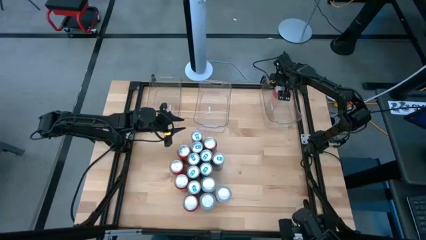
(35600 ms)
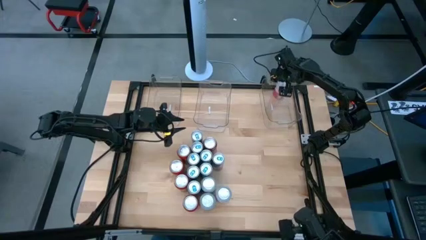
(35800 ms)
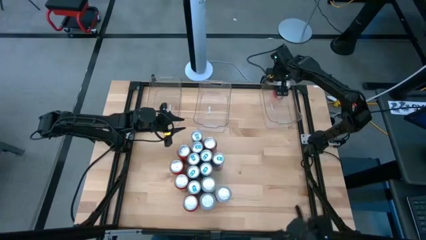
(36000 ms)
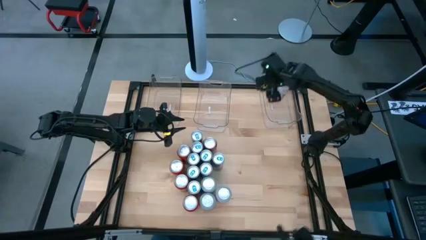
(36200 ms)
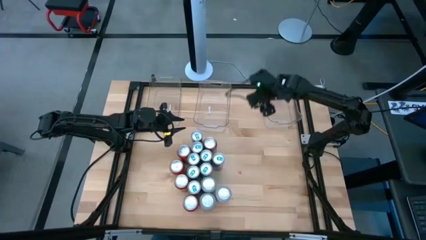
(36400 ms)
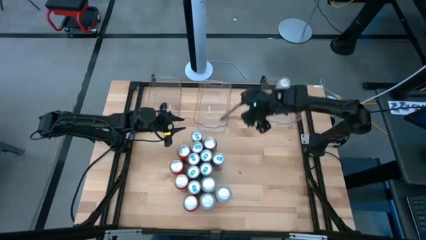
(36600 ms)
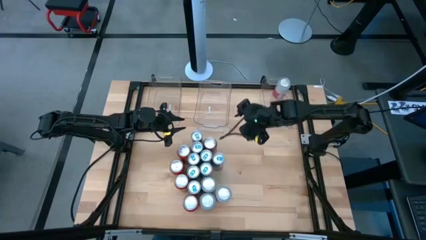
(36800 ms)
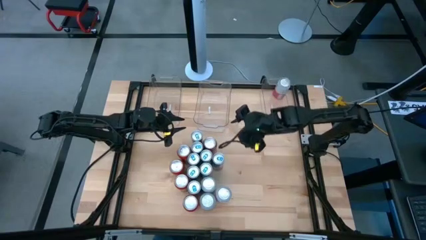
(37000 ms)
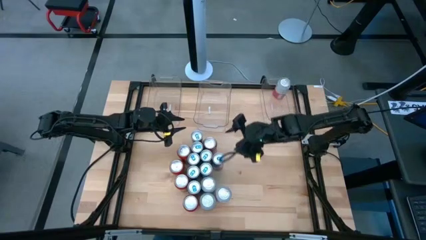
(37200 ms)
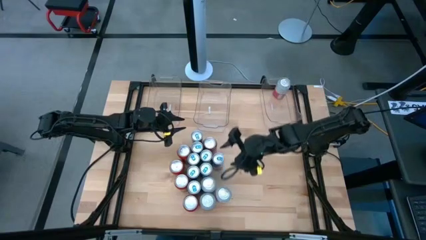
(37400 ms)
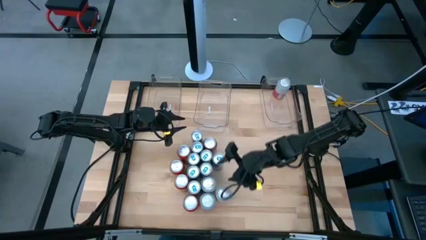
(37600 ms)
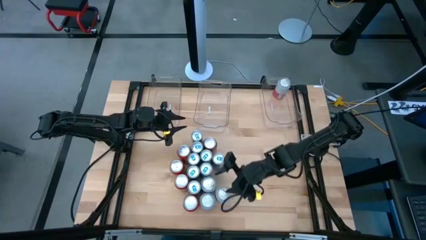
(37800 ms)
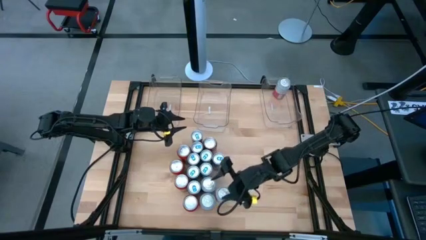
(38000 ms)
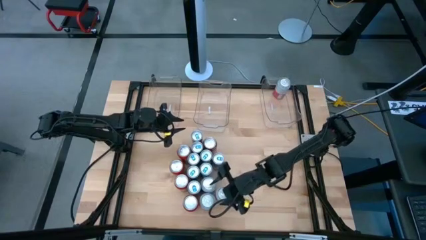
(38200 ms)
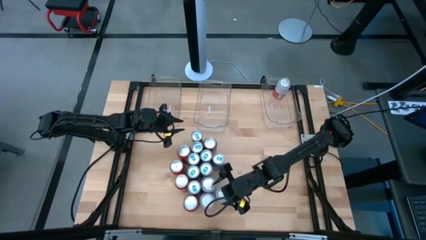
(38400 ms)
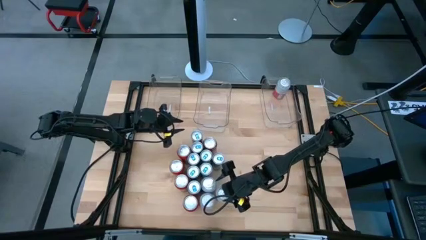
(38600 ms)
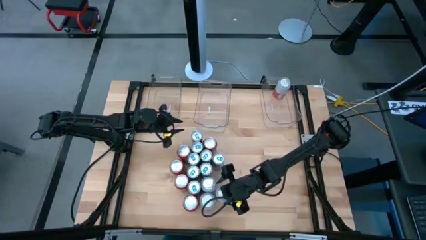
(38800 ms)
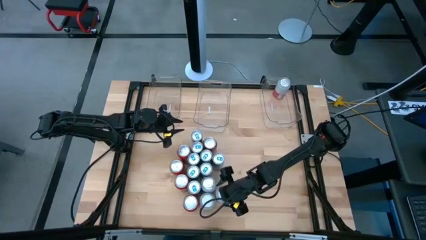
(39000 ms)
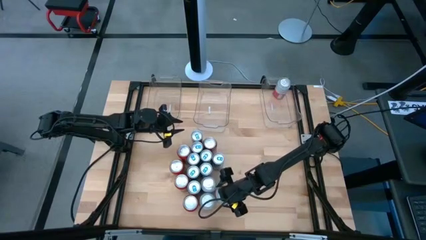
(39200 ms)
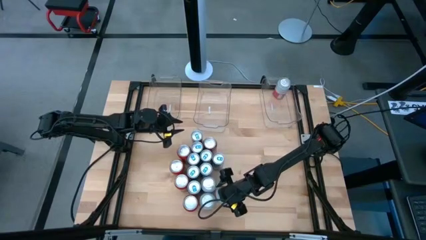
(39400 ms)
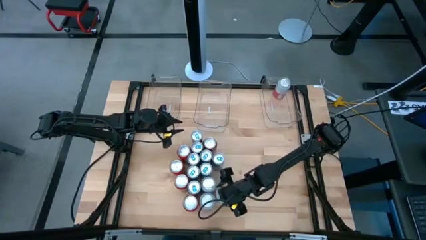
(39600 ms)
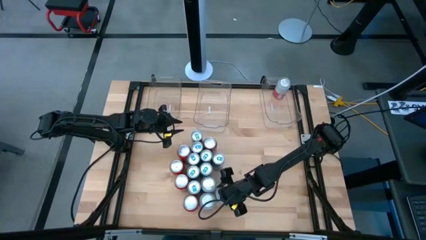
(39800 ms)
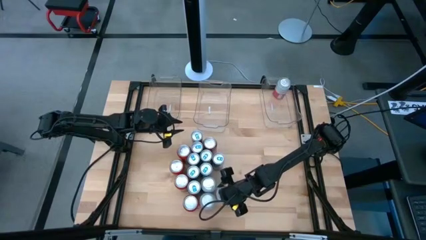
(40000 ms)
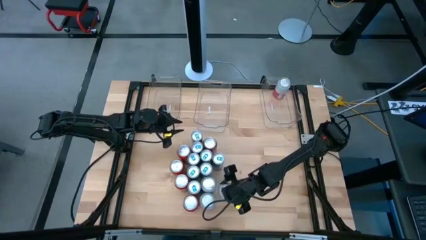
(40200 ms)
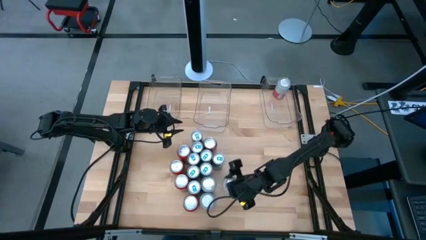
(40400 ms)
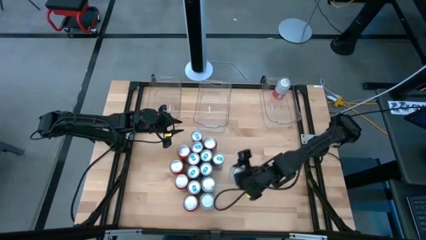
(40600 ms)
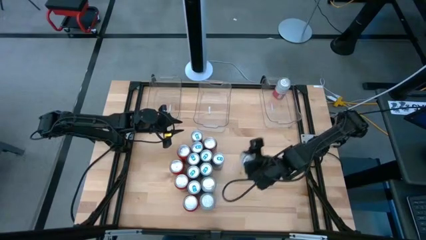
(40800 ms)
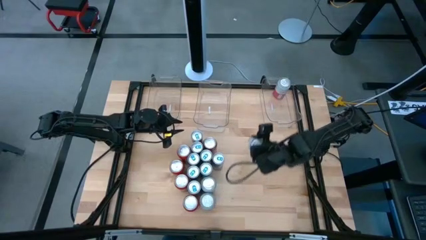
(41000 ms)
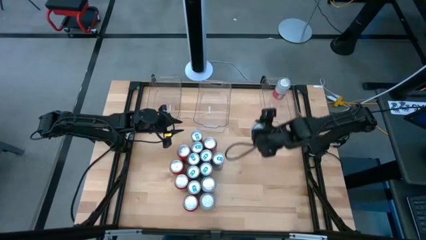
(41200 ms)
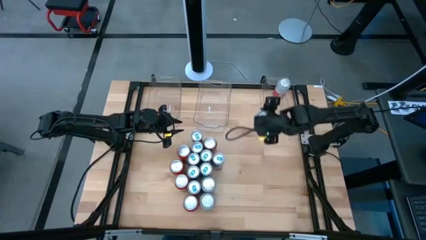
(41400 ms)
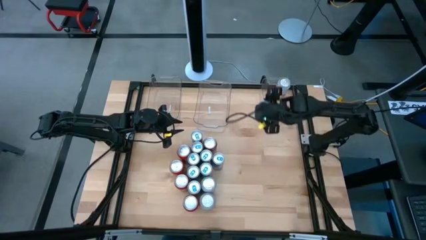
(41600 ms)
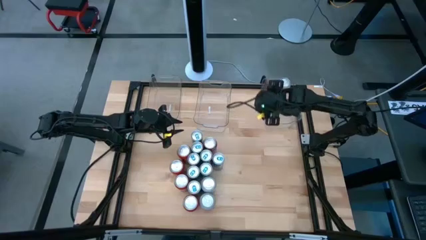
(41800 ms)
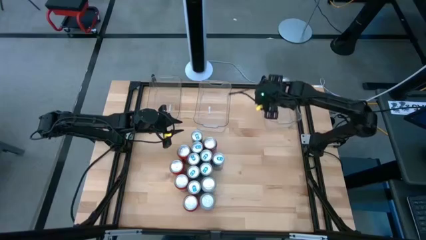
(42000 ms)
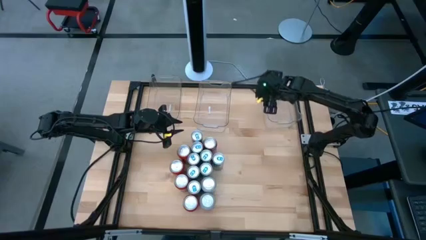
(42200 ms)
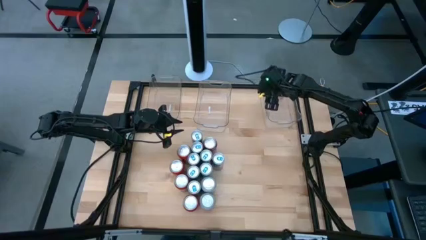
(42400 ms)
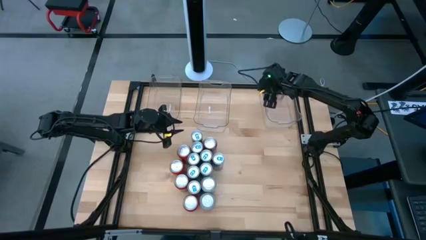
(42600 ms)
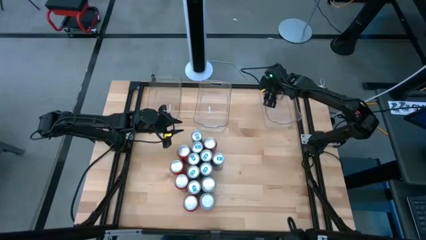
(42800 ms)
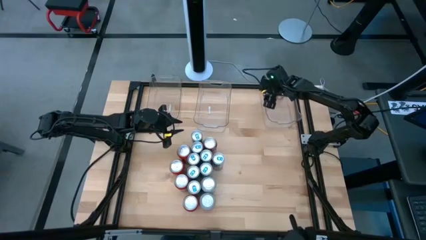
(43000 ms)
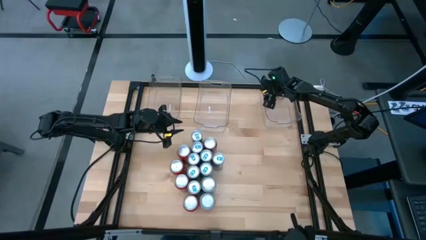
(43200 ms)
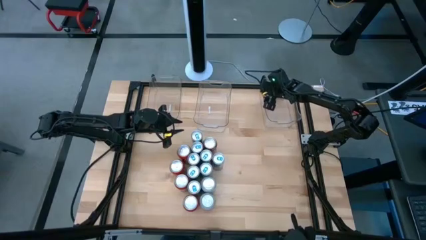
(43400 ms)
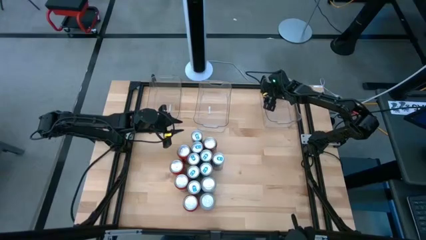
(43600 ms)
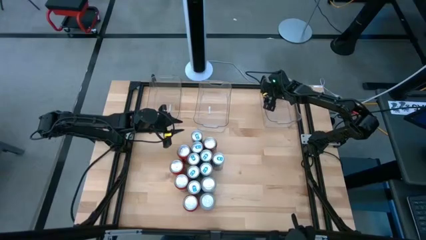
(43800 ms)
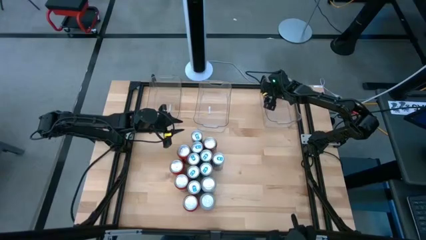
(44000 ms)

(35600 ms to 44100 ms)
Task: Sort soda cans
Put the orange-white soda can into the right transparent bin

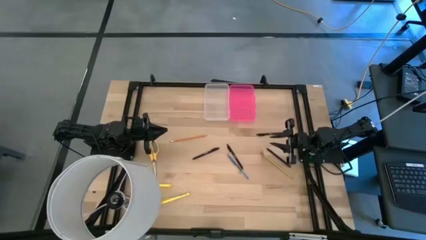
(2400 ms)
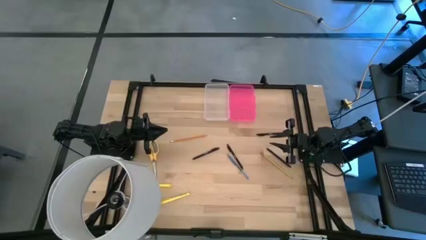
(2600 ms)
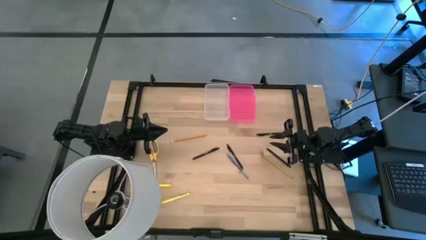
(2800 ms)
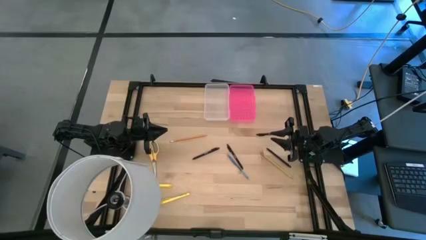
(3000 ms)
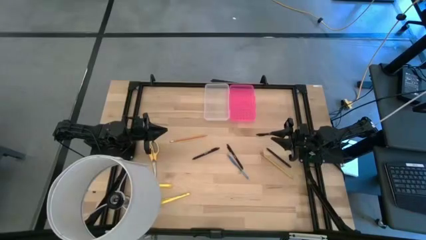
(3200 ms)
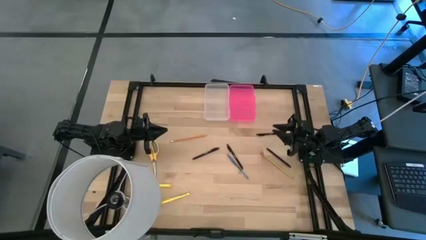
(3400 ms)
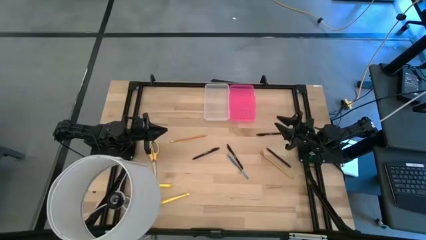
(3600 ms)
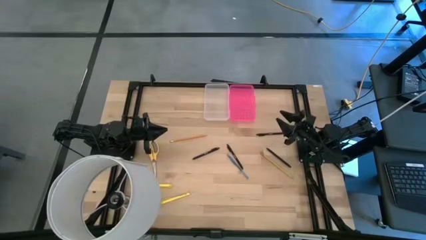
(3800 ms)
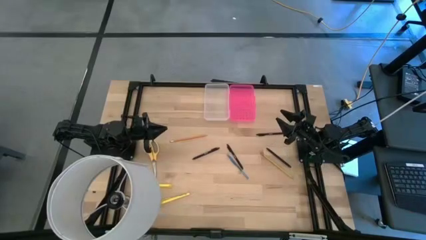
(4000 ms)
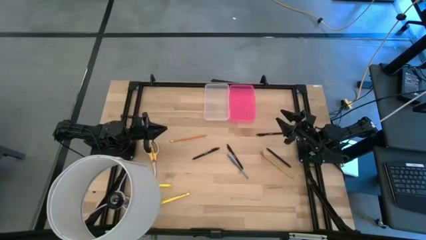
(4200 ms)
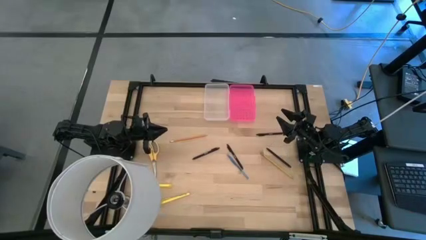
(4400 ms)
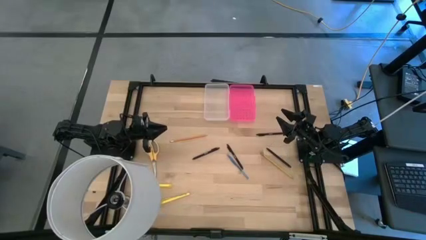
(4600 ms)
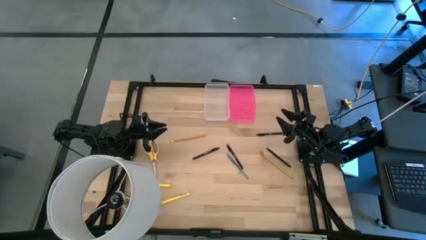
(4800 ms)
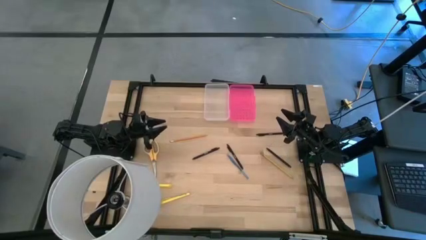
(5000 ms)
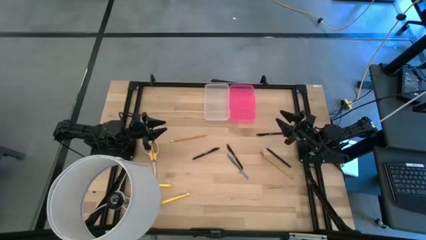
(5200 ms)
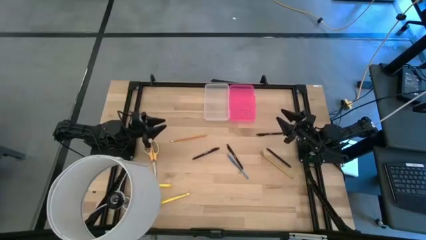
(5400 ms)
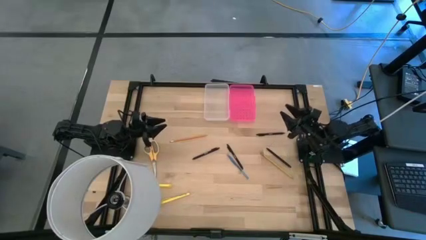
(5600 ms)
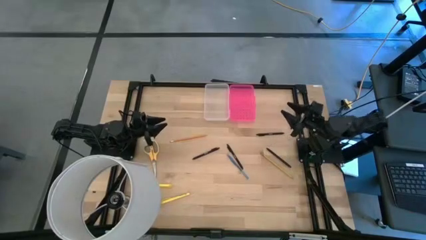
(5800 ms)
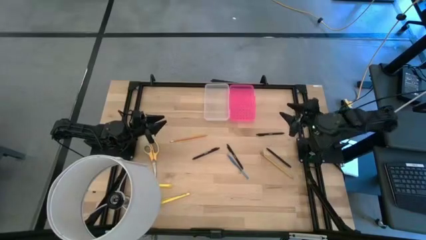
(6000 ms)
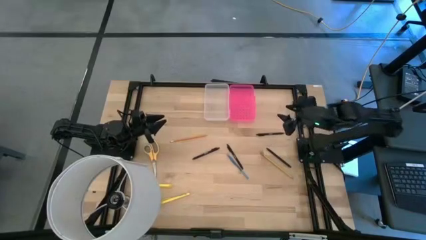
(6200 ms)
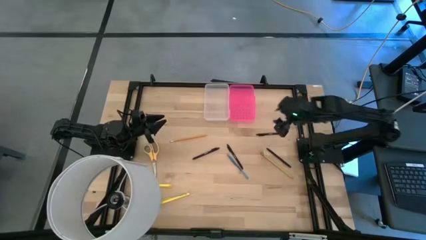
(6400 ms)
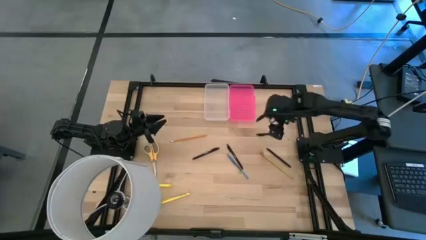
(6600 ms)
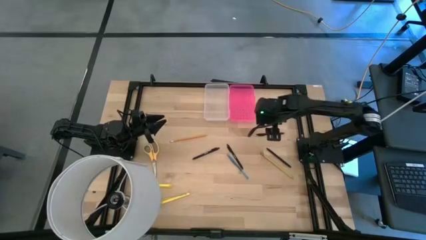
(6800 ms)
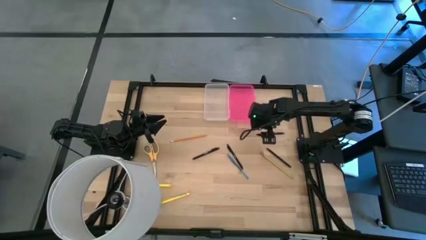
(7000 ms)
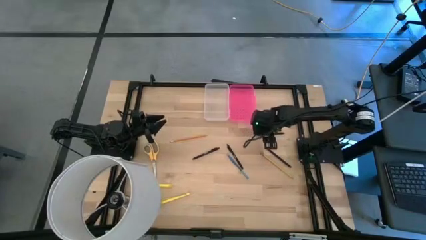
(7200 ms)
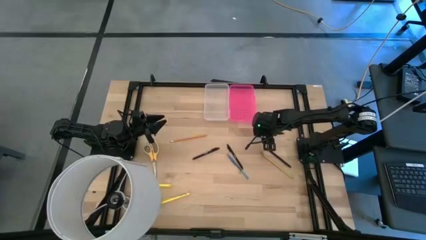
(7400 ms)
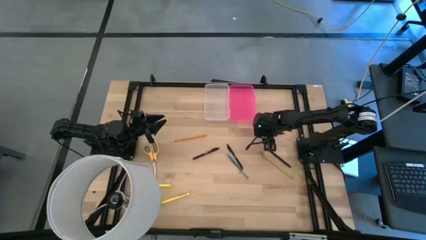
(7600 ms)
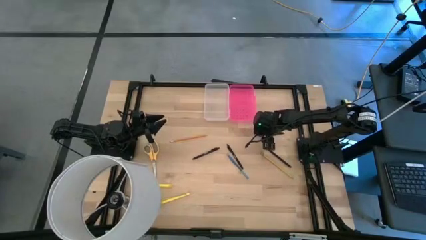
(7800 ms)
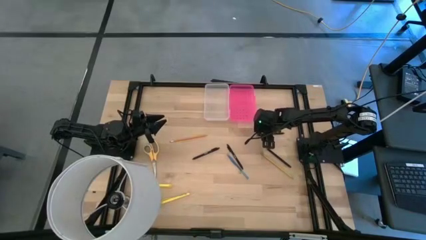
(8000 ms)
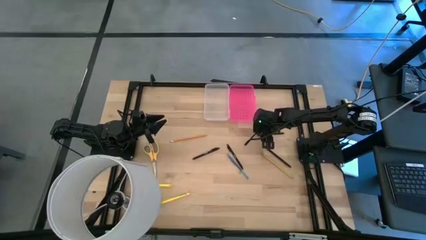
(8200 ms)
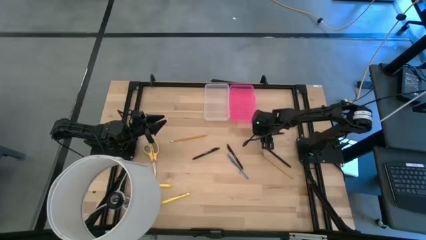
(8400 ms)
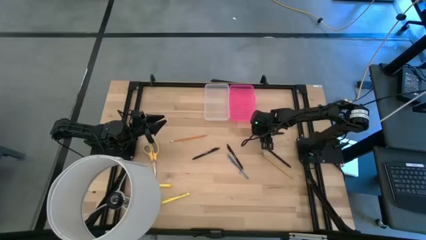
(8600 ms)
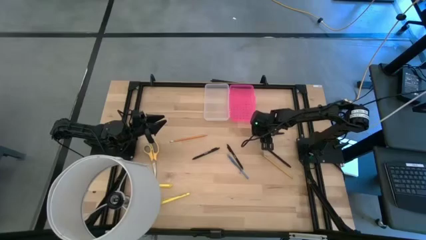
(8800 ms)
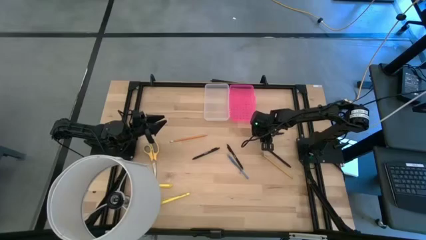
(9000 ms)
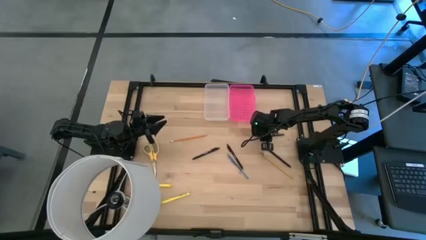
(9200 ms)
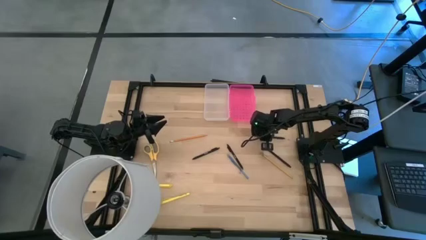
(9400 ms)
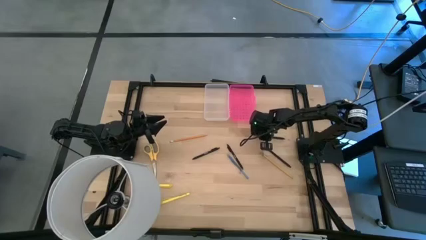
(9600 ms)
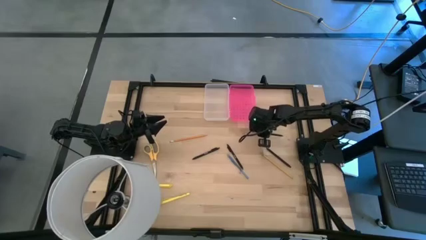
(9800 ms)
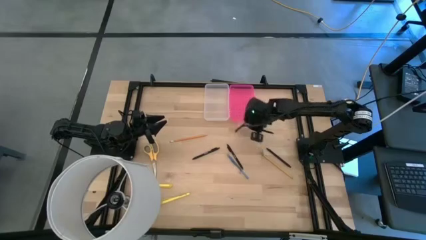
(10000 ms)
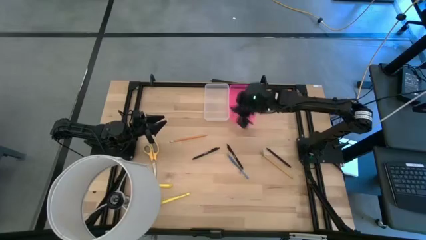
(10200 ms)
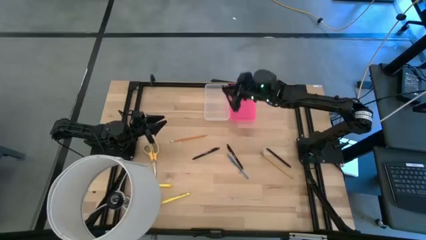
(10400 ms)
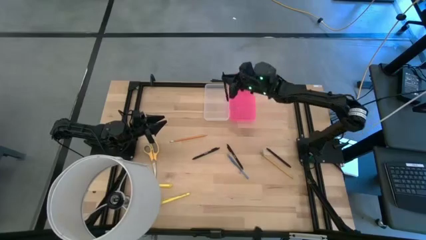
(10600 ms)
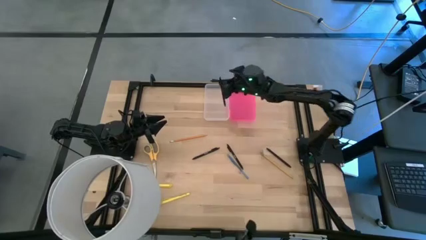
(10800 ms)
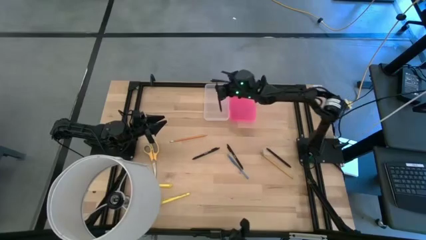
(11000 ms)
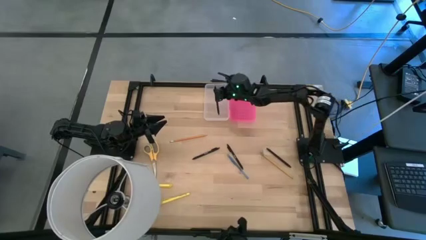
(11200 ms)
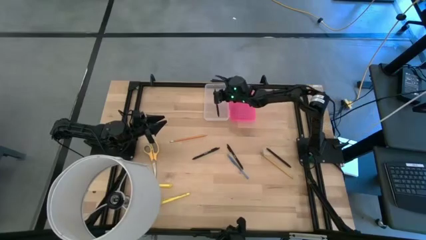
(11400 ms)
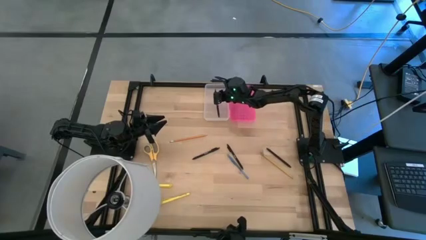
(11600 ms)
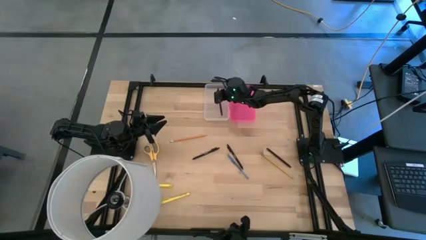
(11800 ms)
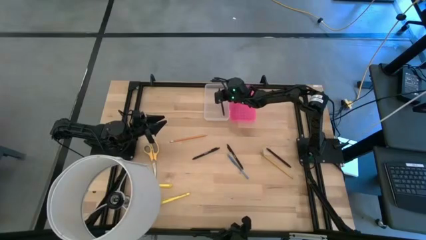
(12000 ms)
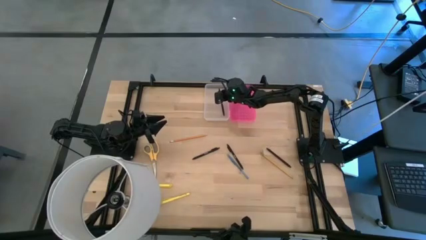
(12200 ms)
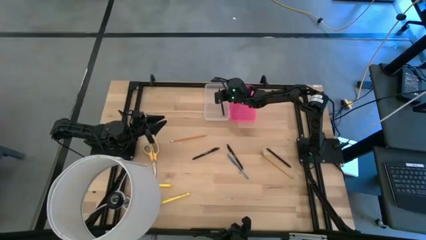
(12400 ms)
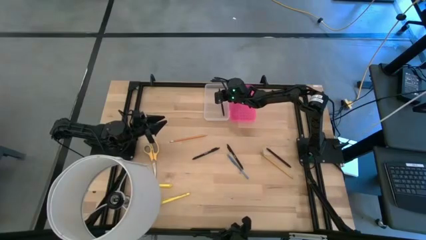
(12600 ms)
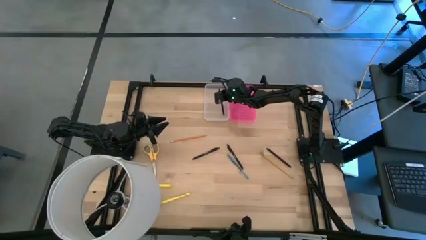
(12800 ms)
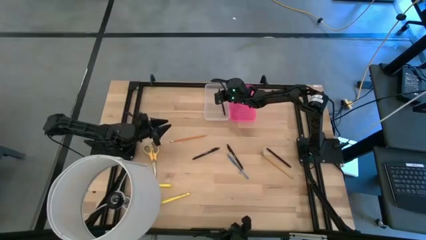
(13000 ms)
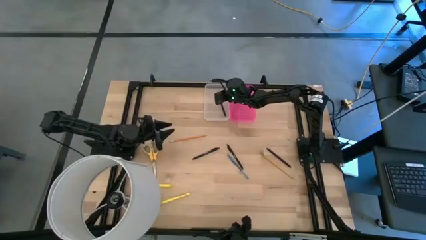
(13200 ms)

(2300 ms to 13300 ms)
Task: Pick & place school supplies into a supply box
Put the black pen into the transparent supply box
